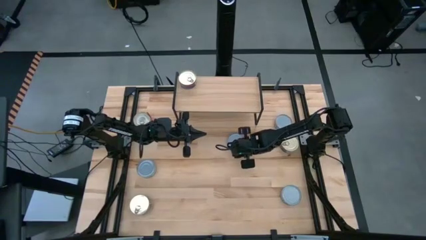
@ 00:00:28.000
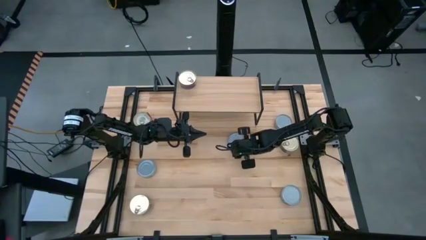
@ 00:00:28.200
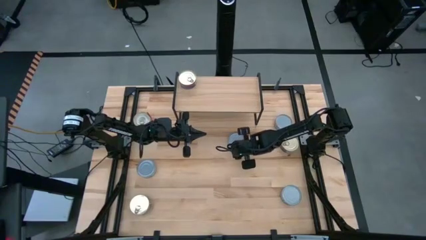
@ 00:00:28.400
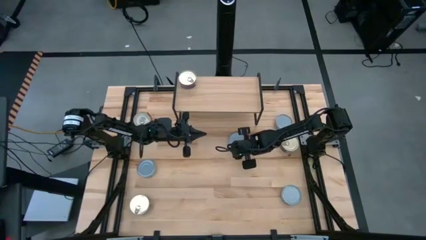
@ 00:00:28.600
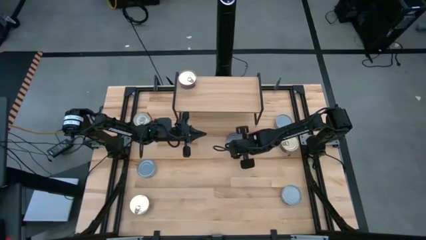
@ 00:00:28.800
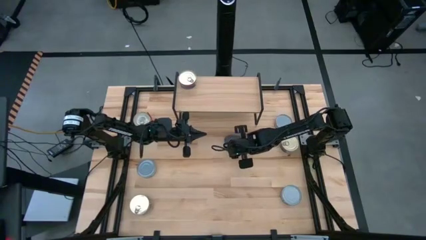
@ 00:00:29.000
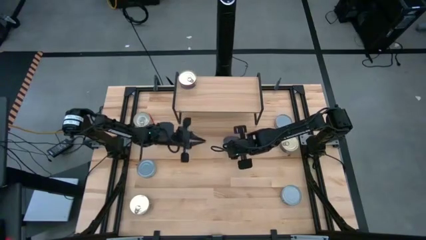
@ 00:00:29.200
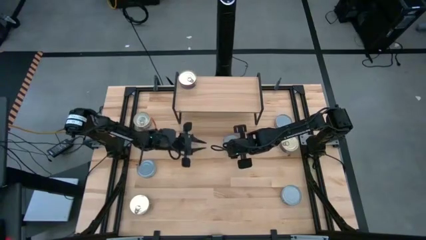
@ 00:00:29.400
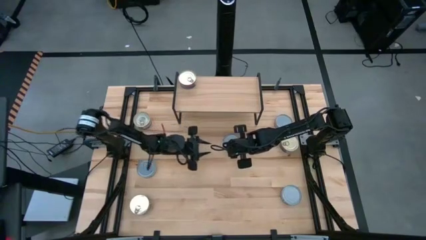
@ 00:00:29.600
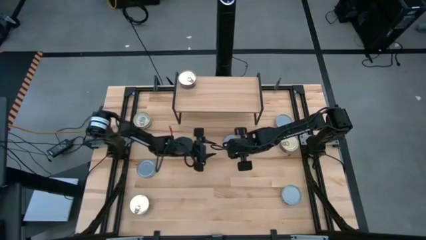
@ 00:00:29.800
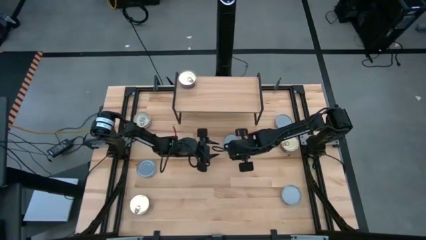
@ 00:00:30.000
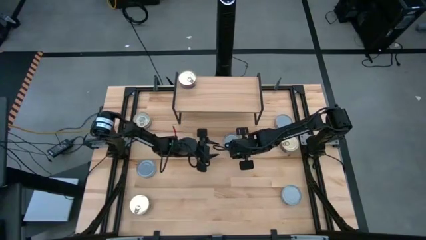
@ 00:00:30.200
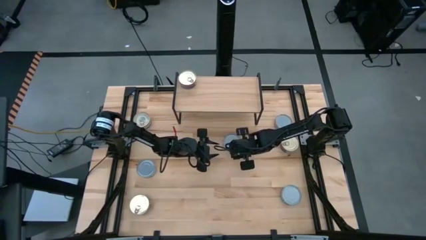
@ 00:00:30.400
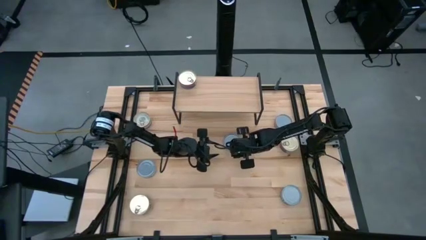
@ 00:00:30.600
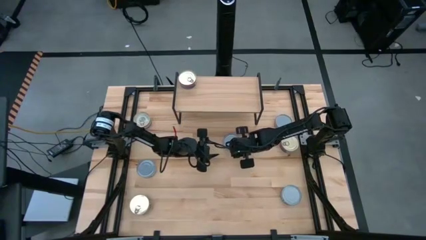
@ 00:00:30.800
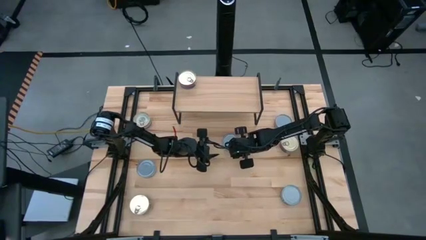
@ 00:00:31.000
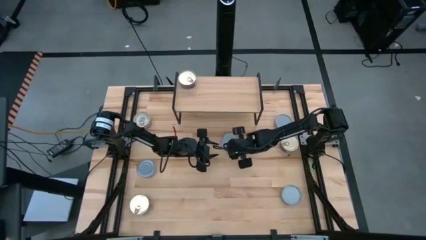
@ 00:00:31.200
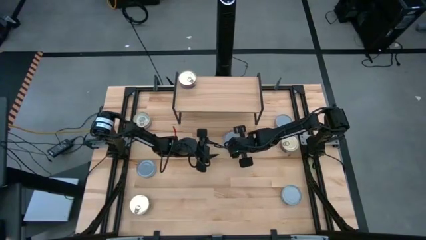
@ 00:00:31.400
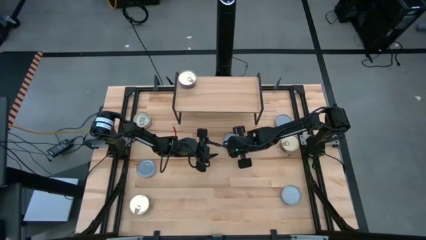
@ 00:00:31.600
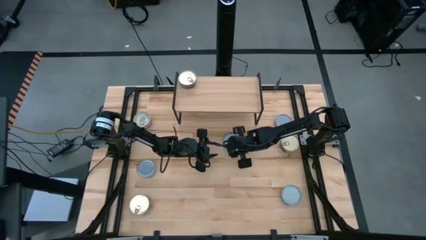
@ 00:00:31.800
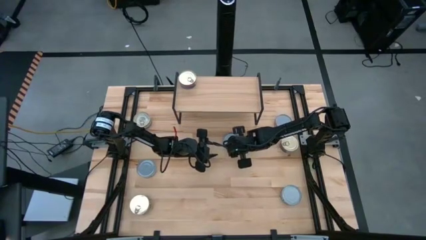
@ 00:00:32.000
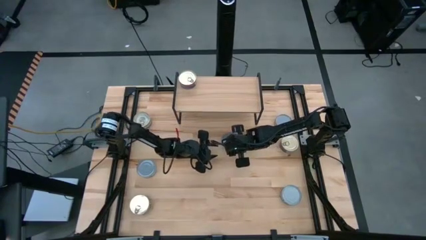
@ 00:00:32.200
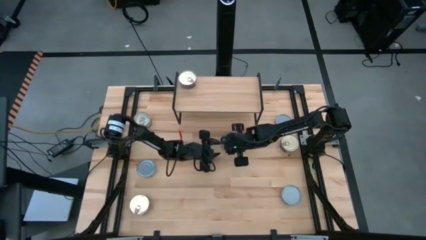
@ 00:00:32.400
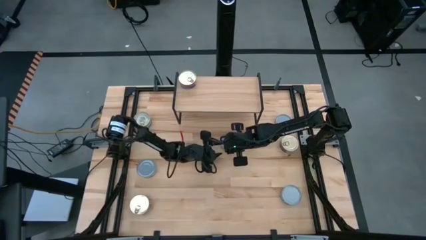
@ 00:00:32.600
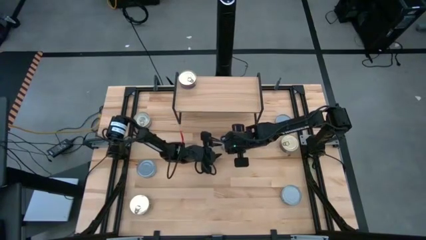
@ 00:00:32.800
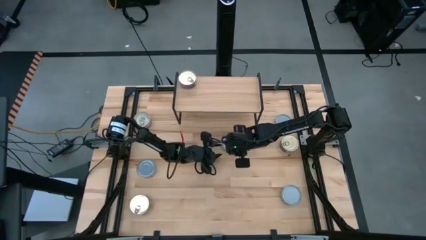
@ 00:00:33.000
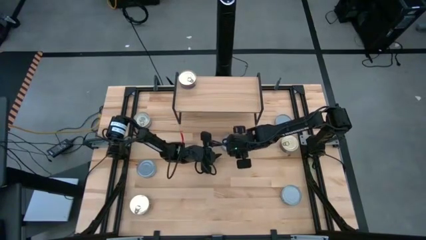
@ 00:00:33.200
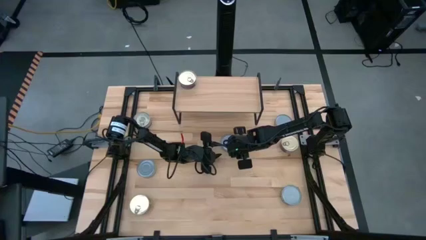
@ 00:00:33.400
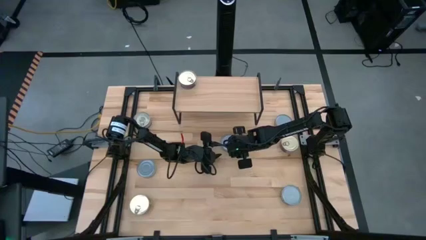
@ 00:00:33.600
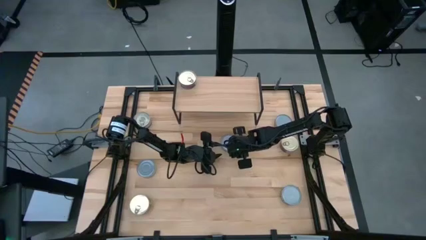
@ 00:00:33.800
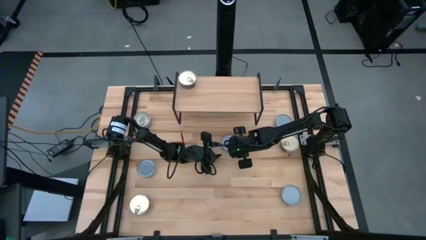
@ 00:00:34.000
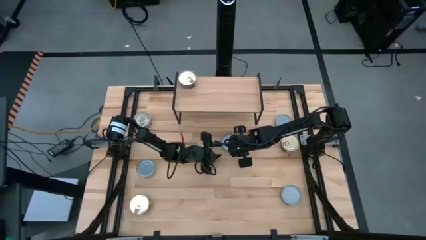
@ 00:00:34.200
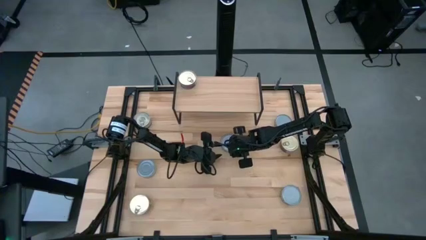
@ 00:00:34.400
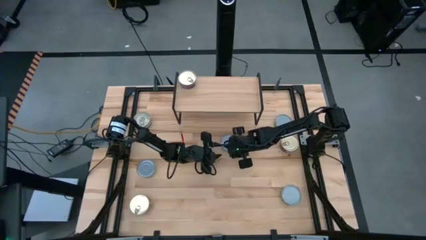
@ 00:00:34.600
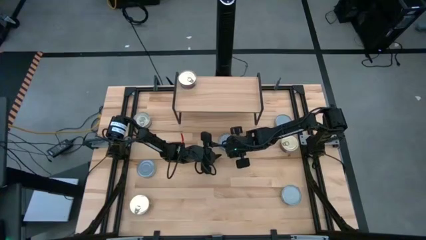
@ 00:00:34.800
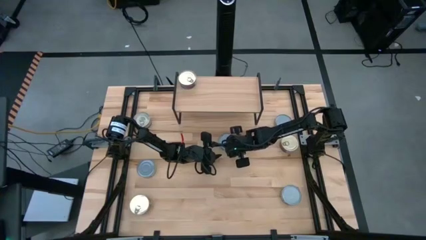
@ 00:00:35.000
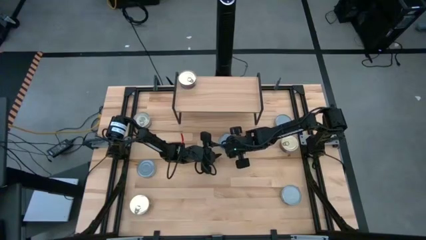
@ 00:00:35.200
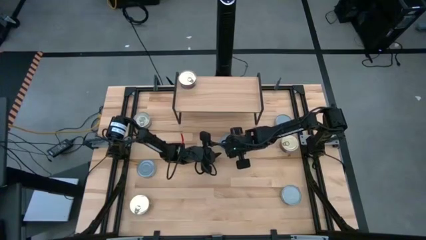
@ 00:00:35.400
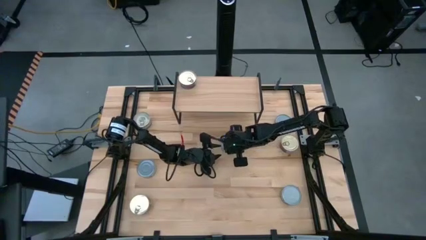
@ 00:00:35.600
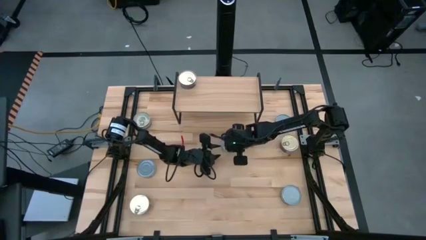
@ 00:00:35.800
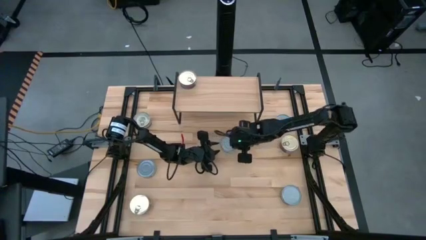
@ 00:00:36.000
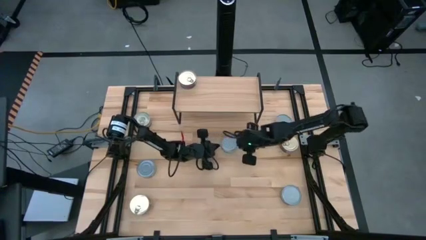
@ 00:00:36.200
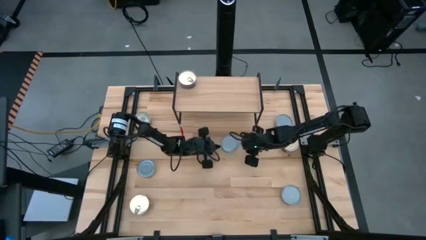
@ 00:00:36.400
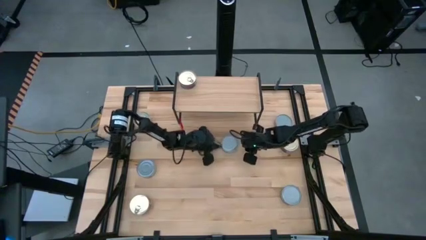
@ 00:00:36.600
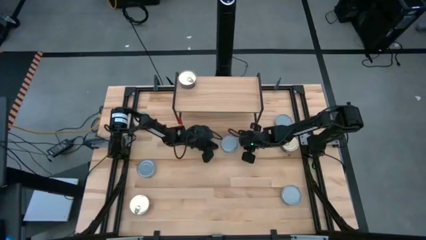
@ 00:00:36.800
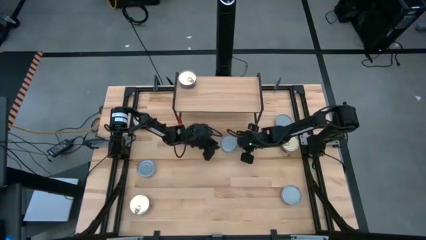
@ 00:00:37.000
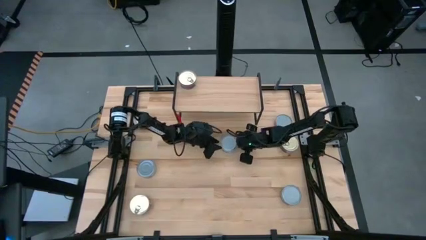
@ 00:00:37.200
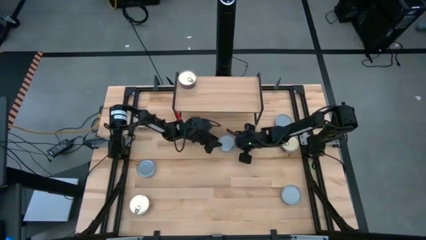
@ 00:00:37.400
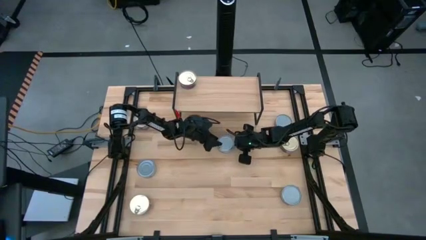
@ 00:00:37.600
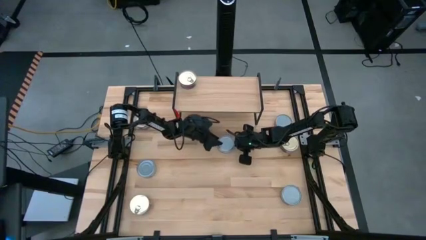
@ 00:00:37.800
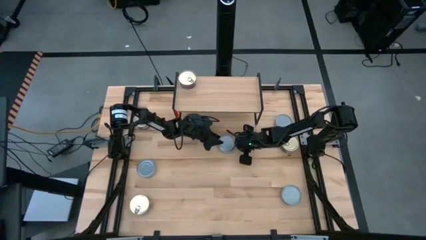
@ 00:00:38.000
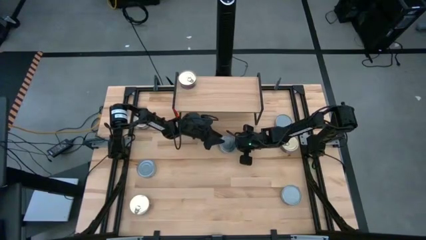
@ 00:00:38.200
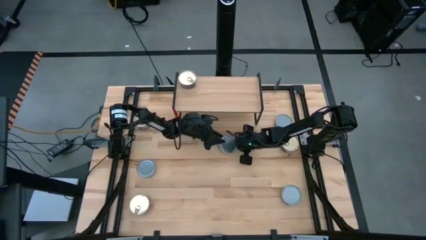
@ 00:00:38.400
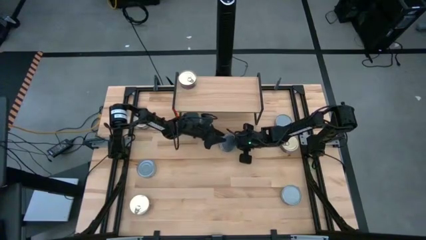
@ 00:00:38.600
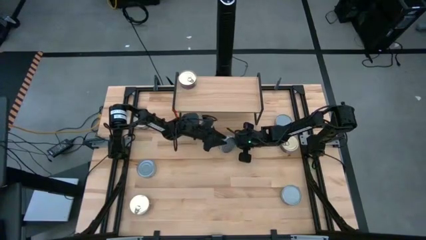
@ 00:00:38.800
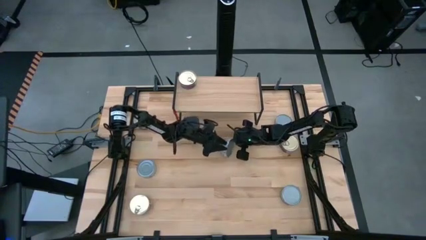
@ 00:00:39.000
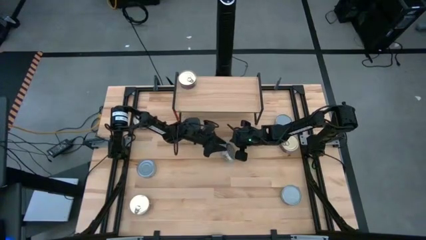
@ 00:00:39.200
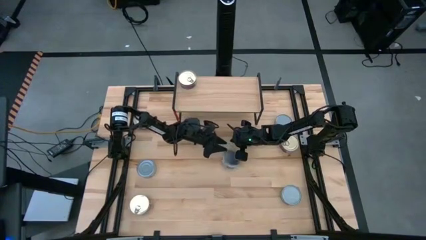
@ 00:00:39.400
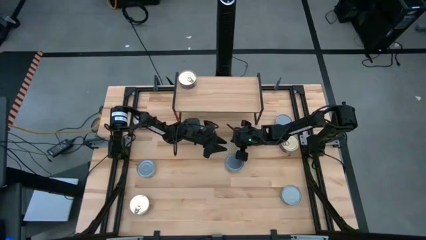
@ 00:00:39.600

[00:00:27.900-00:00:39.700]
Task: Stack canned seafood by type on shelf
Put the center green tuna can on the shelf
